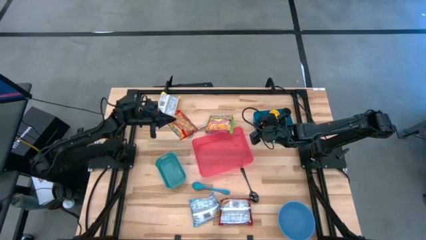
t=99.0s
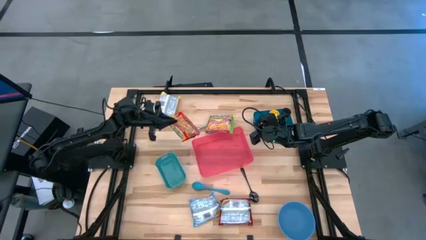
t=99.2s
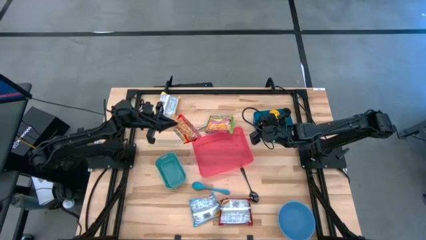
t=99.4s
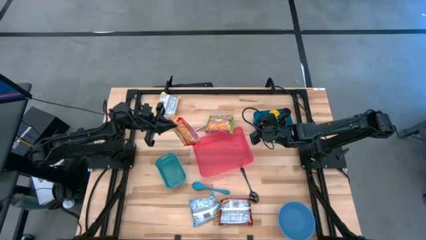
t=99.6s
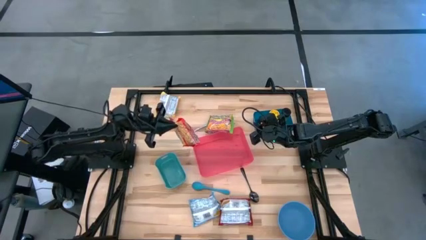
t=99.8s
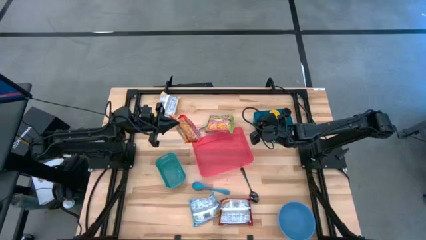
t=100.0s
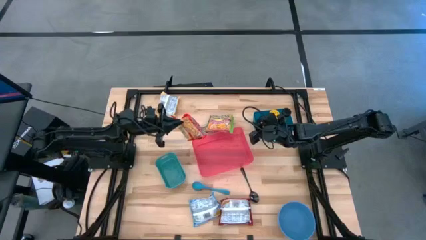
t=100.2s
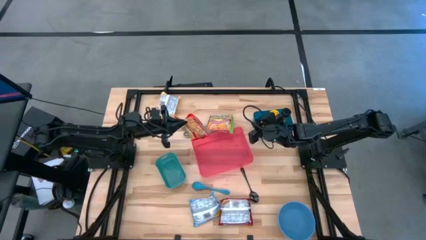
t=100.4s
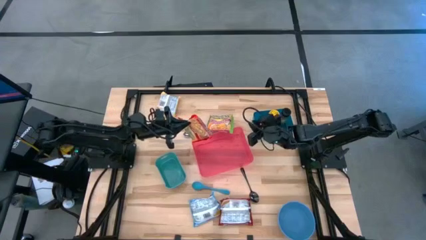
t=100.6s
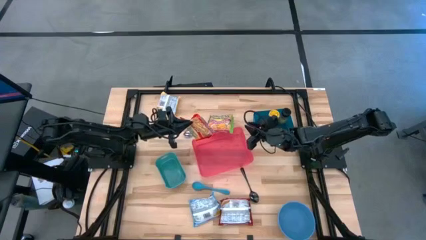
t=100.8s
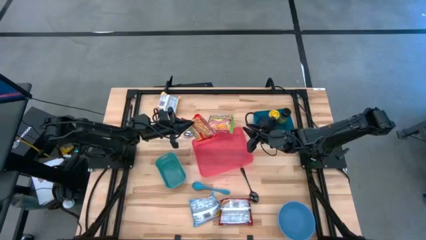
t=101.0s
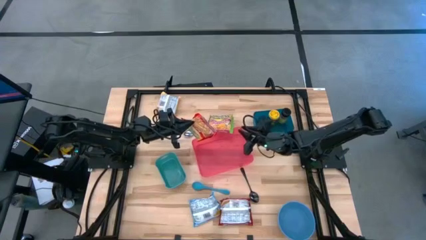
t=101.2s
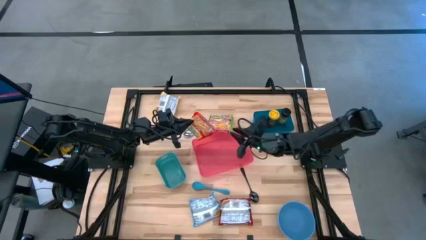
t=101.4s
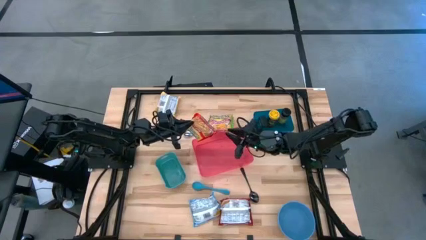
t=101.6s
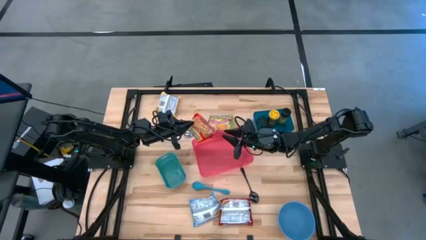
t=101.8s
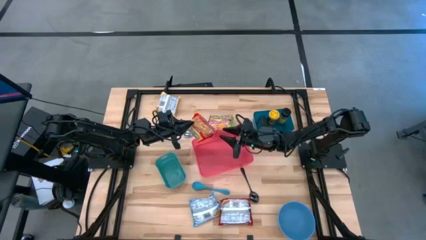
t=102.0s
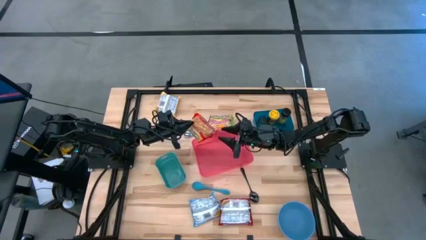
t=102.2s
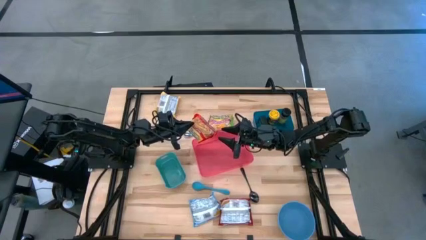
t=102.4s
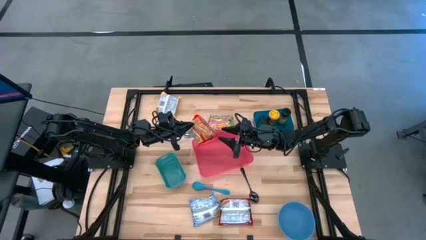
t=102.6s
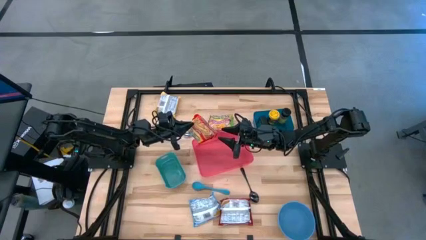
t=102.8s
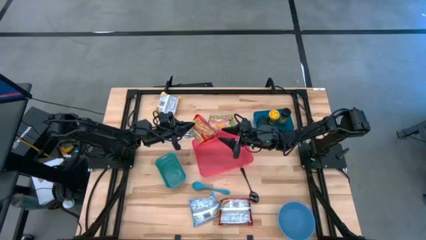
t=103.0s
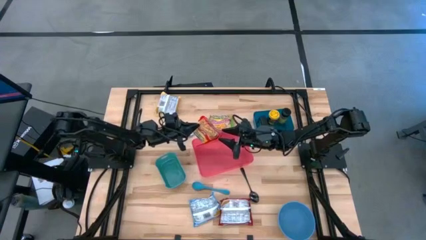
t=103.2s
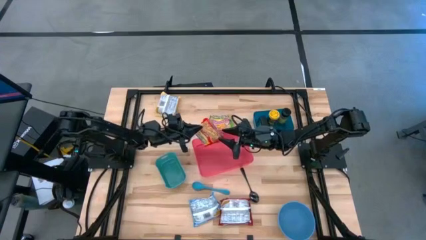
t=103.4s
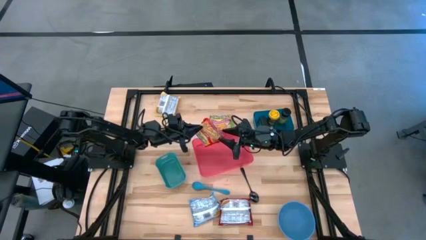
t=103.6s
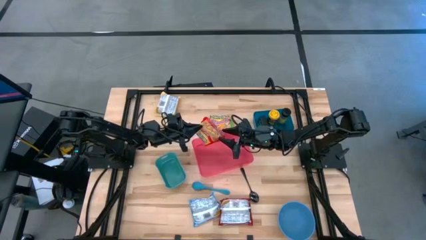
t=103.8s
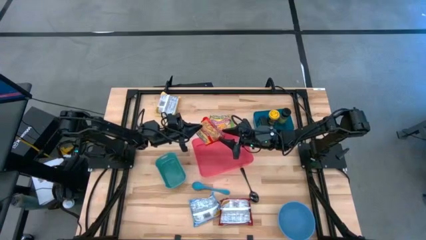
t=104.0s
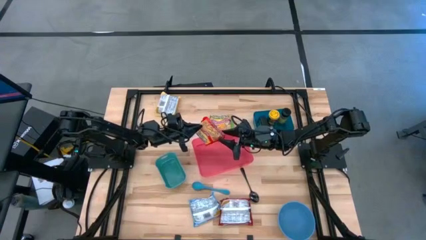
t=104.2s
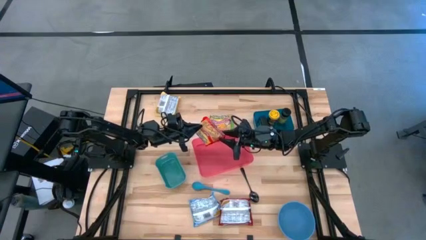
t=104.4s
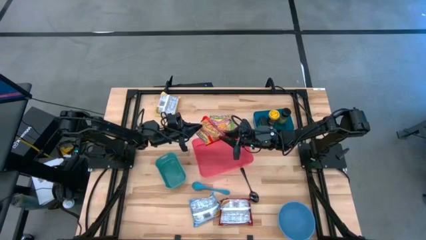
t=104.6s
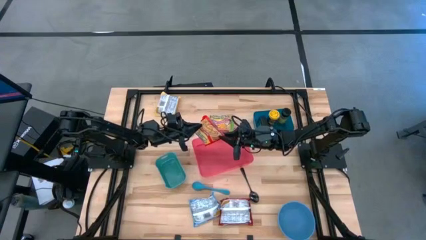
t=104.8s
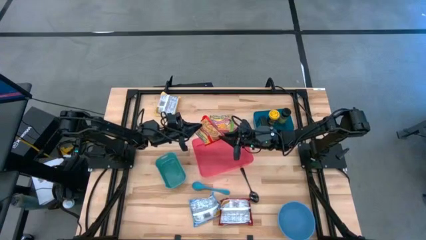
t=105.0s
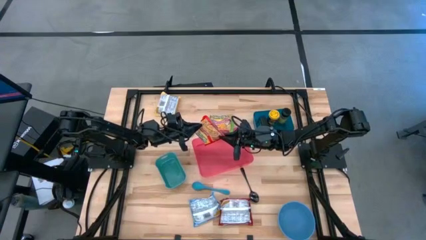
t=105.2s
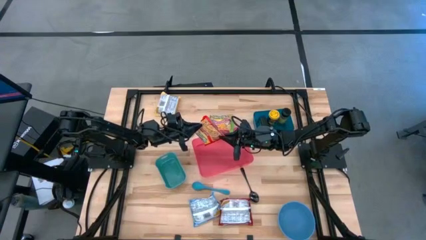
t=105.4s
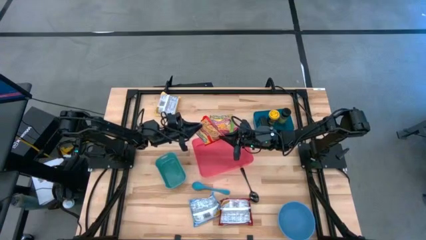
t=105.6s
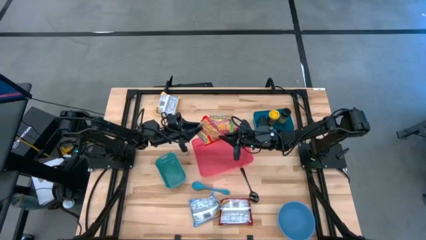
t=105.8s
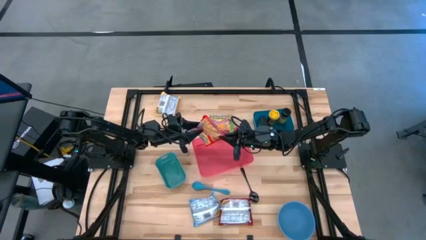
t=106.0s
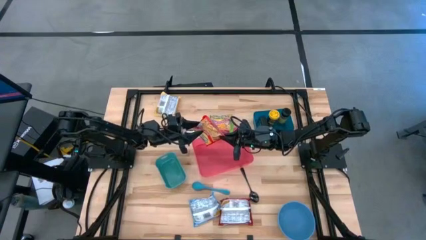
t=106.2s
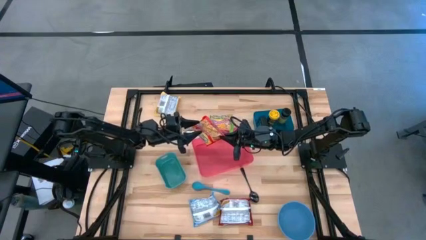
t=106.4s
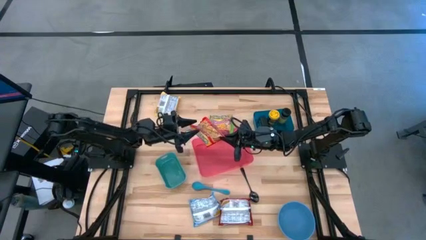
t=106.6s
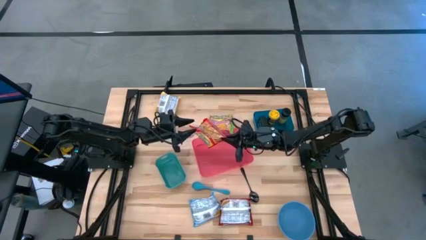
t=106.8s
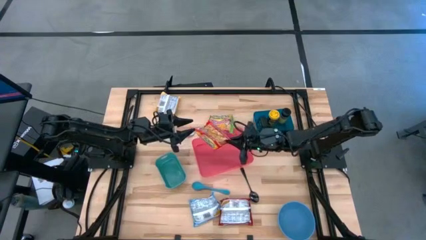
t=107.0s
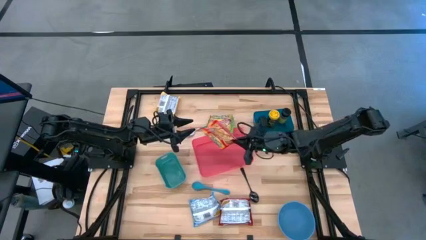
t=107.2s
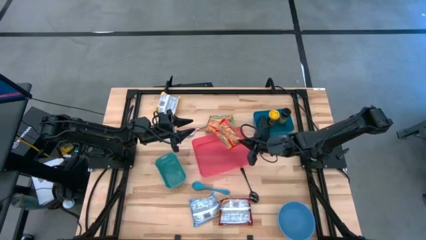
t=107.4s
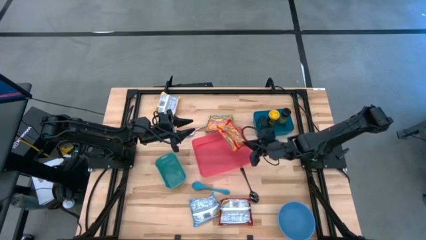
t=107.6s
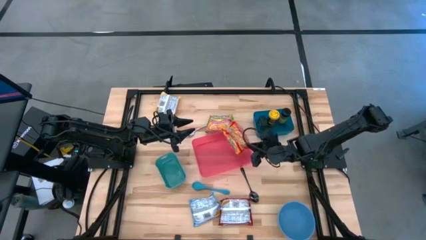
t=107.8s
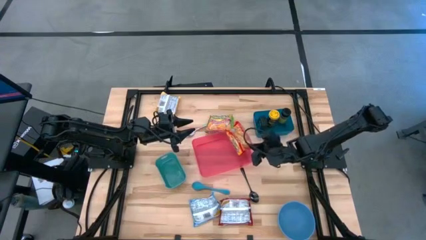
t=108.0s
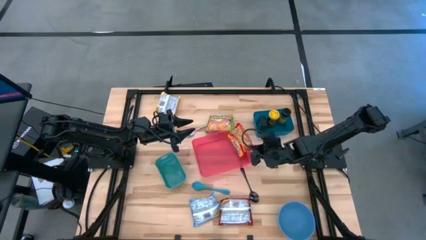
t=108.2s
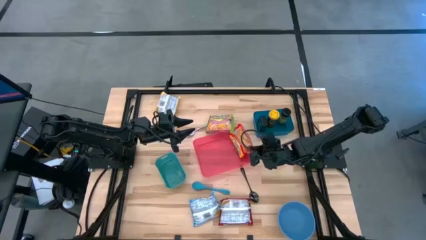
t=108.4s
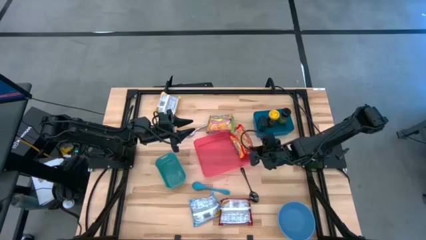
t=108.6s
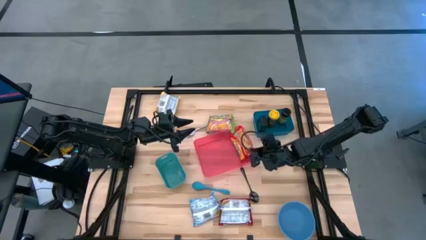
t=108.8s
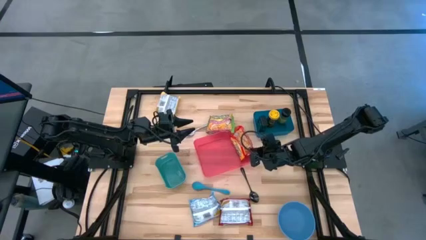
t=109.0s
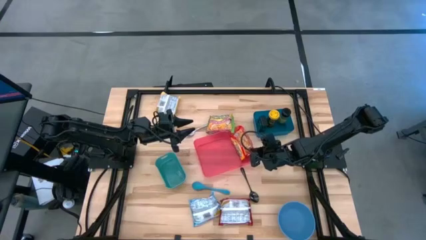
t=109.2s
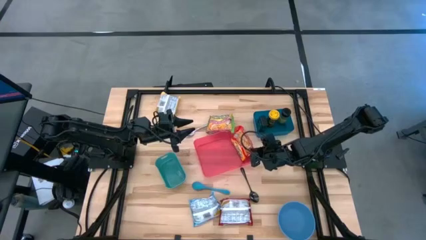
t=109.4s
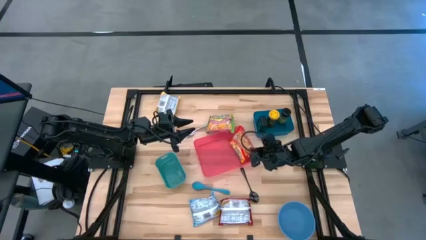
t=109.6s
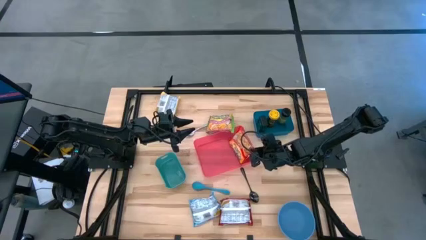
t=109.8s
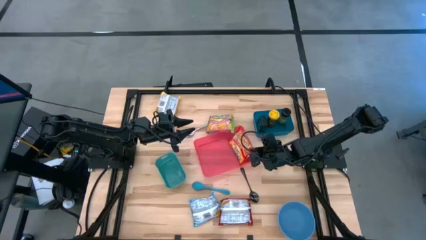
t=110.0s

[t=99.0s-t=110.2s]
Task: Pick & Place Food Item
Put the orange noodle pack into the red bin
